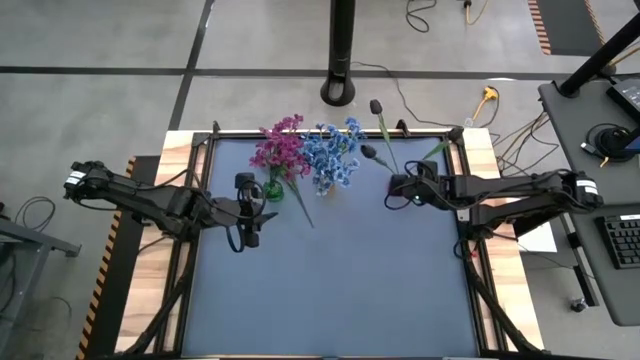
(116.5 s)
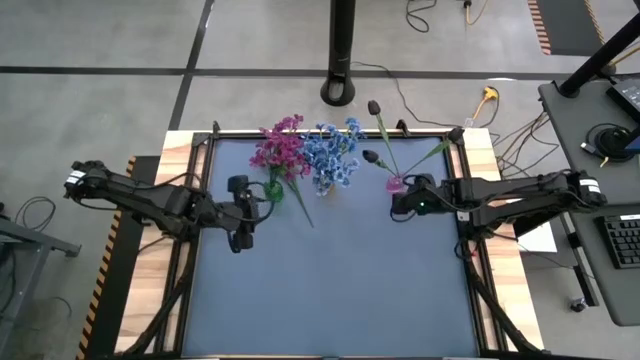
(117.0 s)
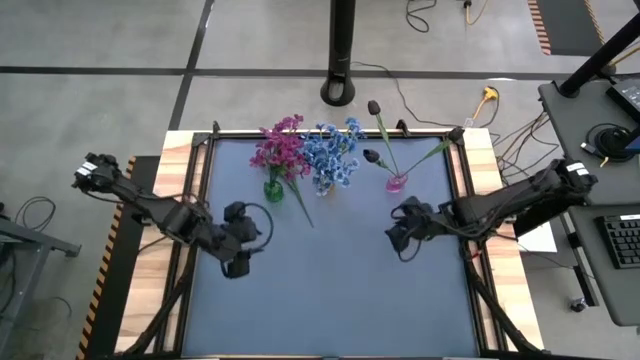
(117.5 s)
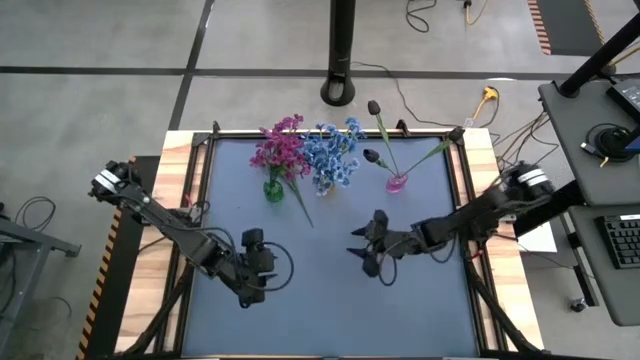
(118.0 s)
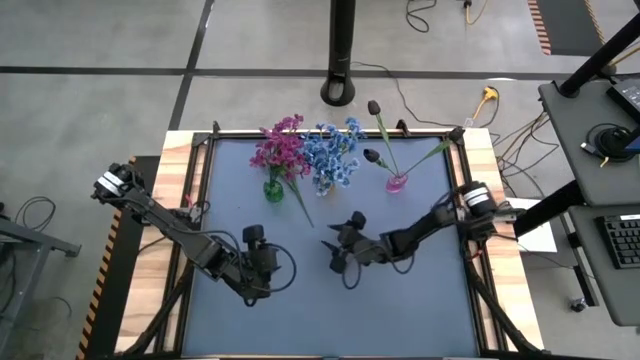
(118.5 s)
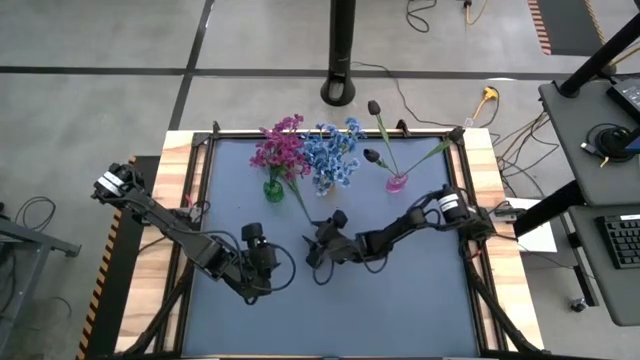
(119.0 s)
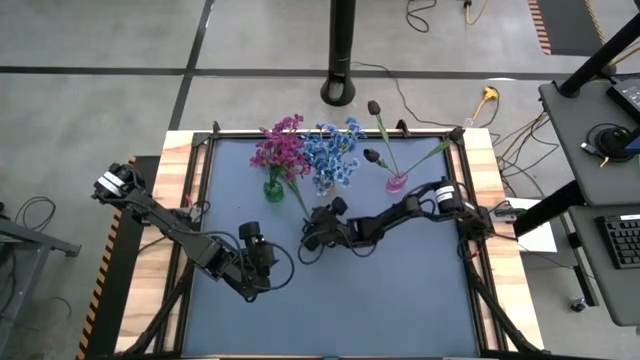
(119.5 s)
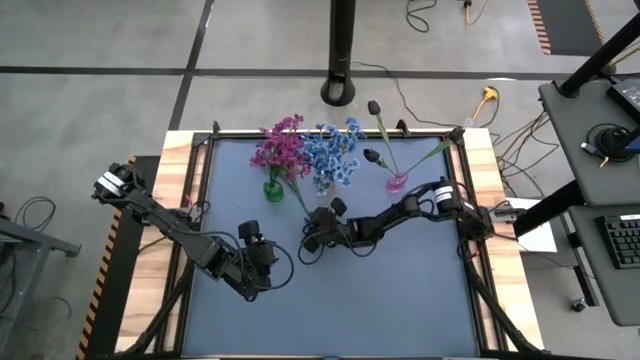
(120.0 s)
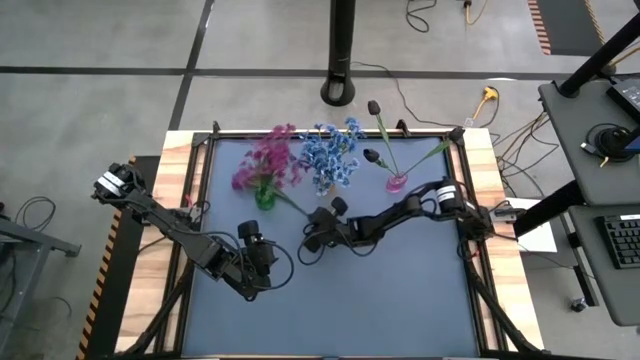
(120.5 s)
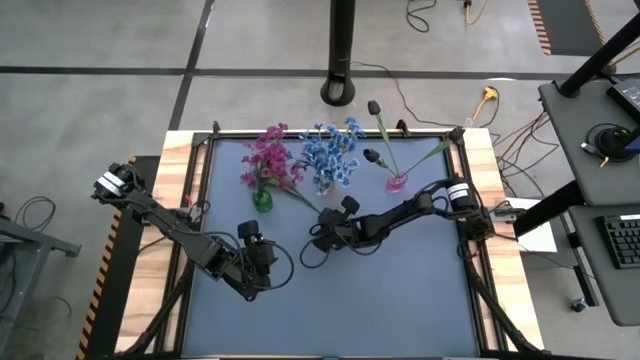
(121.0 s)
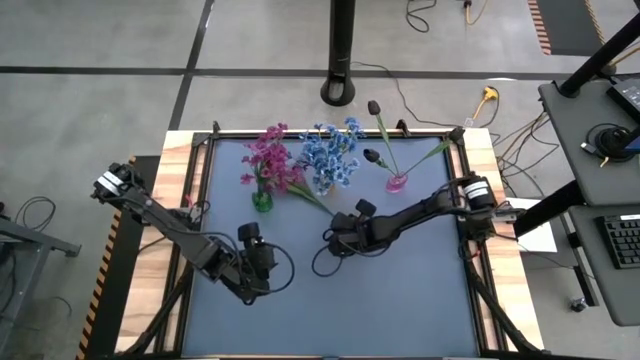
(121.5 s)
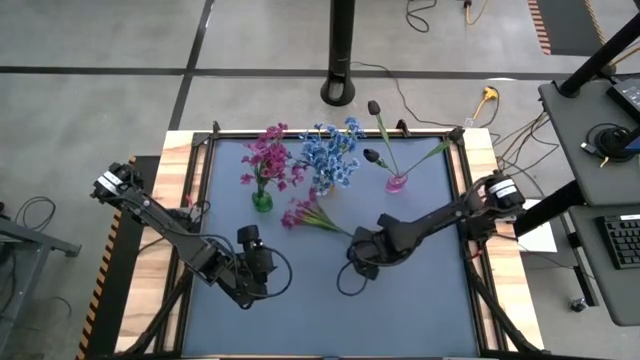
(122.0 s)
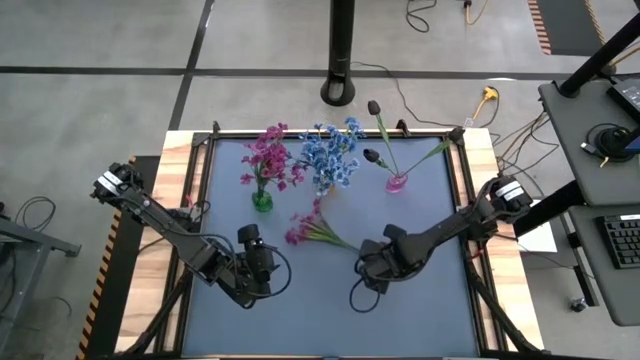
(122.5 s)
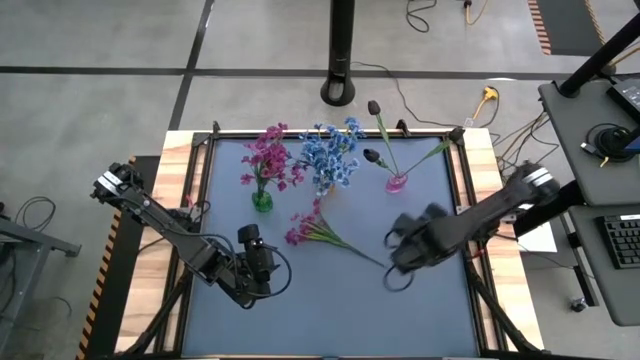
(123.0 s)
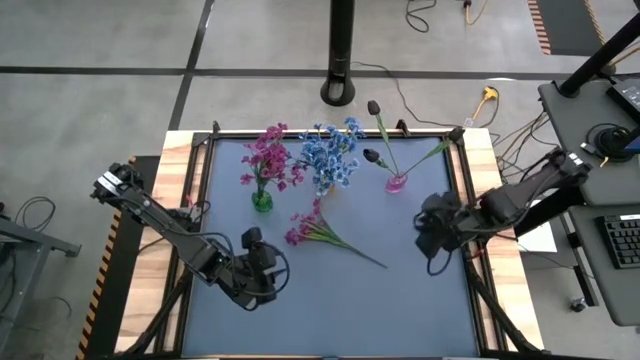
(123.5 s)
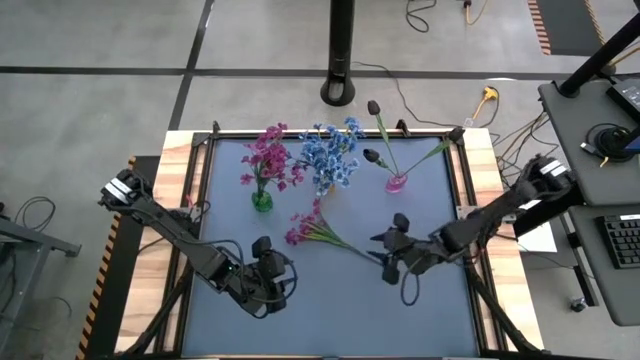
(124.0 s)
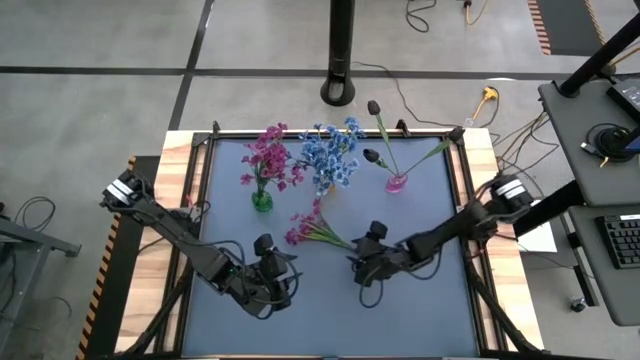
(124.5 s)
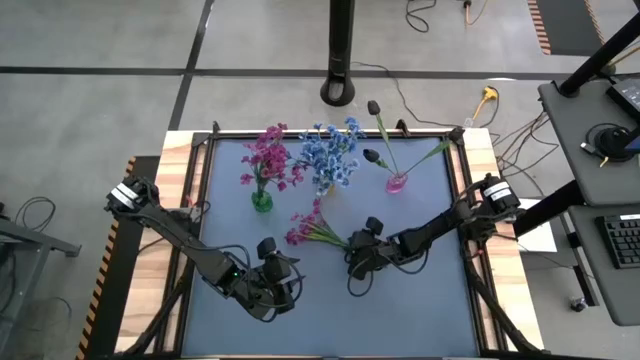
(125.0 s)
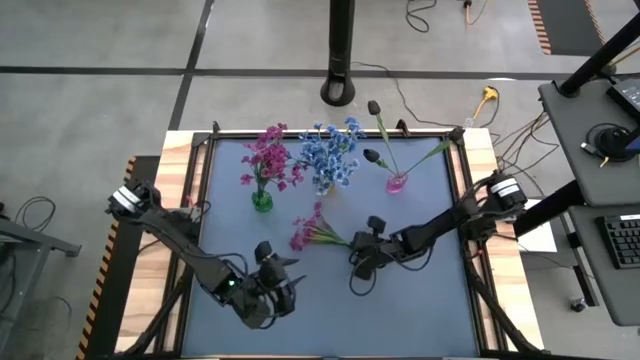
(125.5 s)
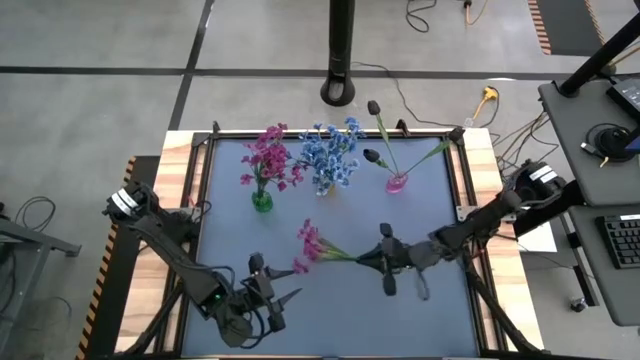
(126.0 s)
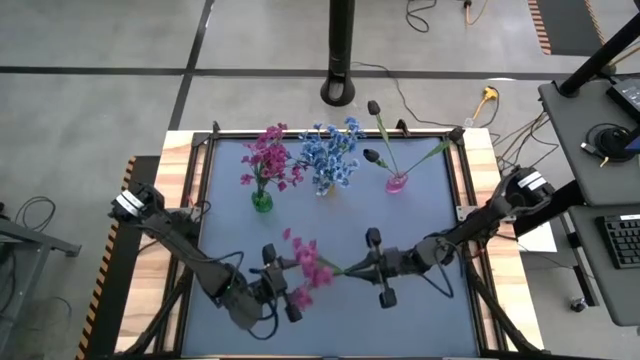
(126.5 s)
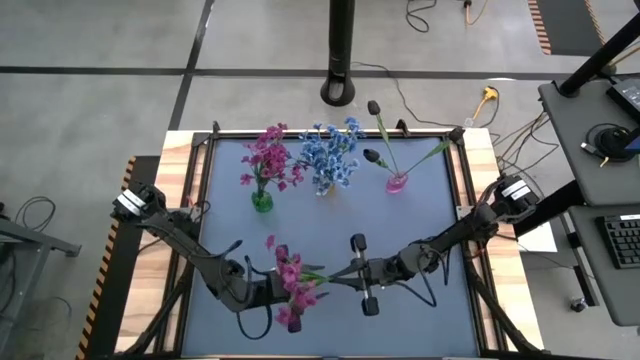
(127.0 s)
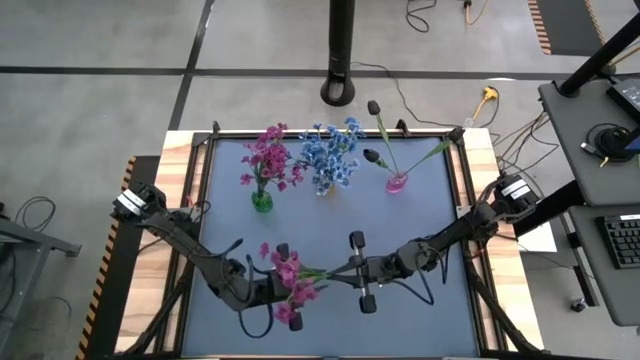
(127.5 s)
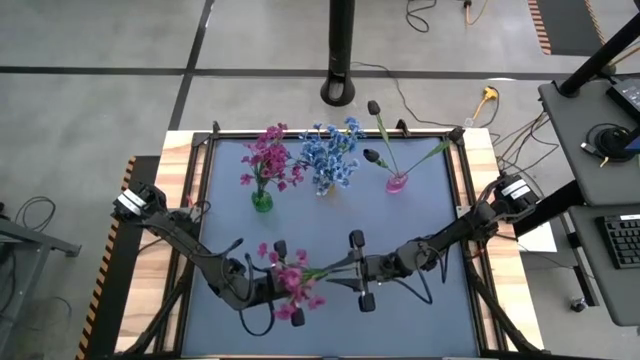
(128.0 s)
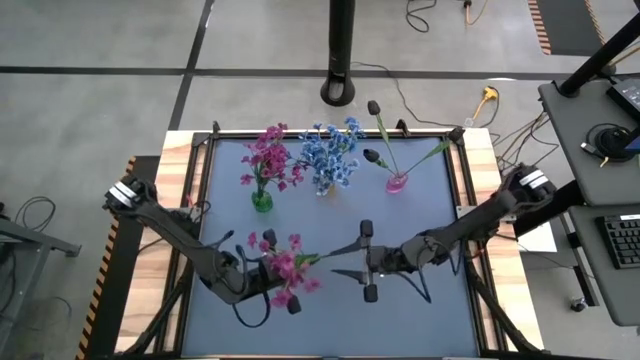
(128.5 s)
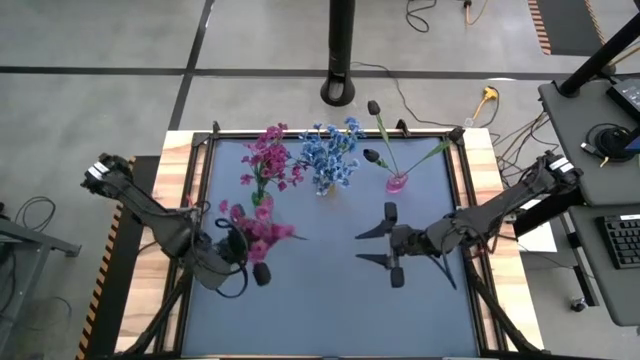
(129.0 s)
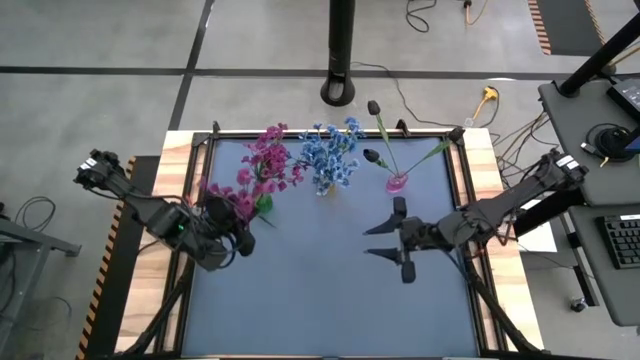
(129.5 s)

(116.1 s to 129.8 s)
Task: Sort flowers into vase by color
Put the purple flowers into the green flower vase

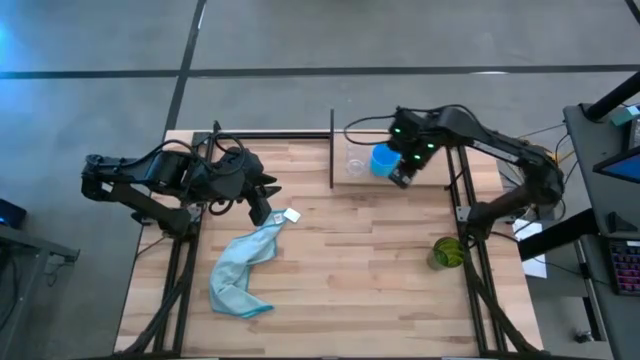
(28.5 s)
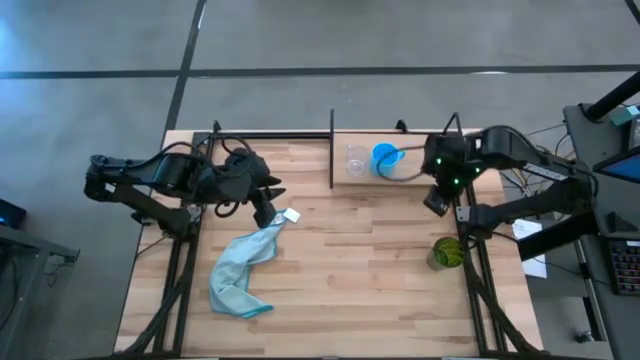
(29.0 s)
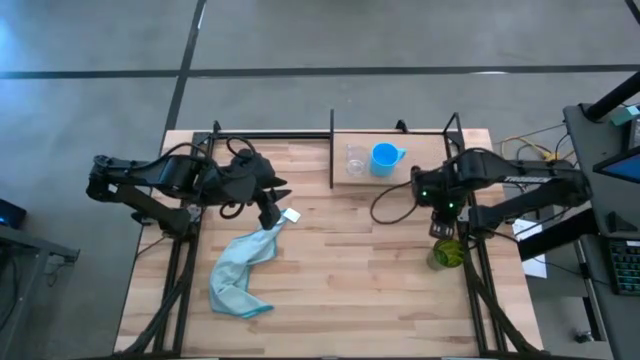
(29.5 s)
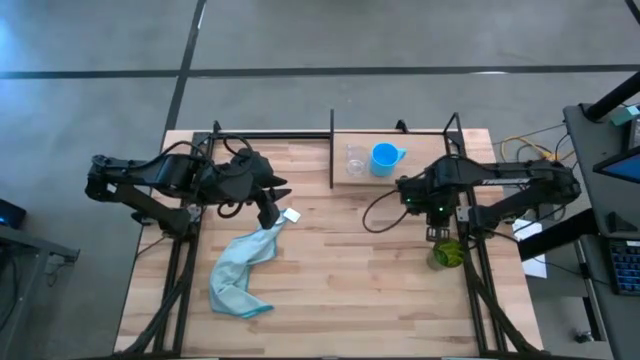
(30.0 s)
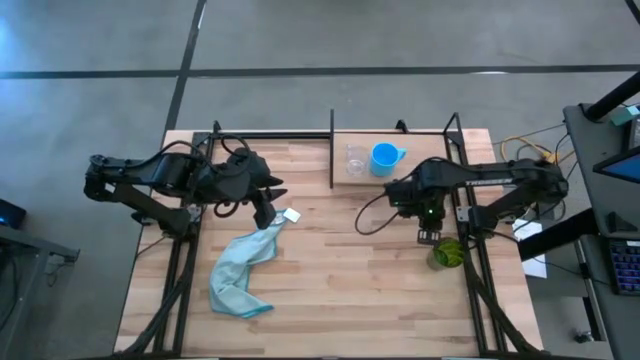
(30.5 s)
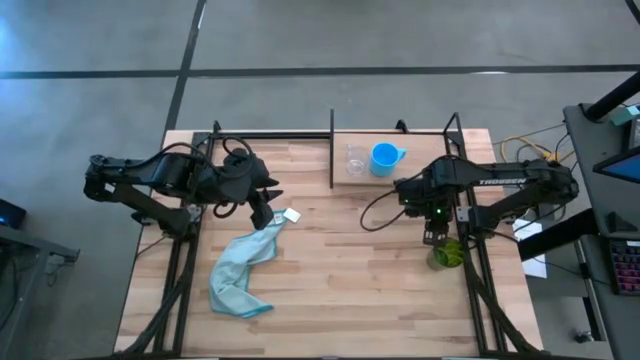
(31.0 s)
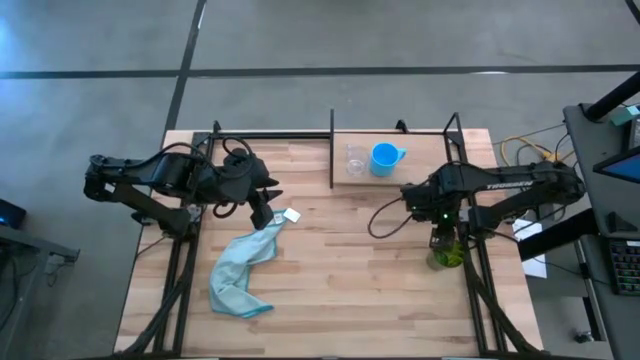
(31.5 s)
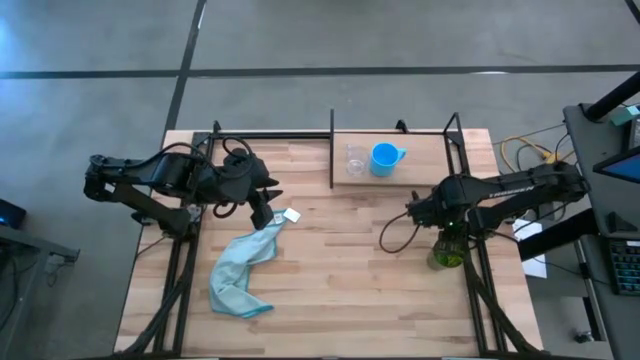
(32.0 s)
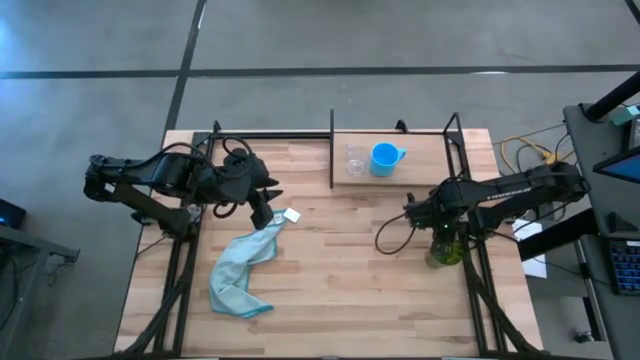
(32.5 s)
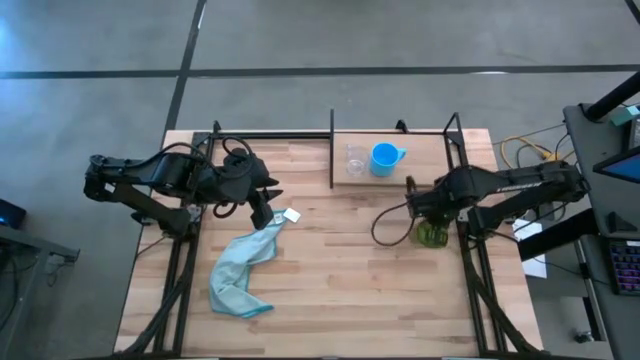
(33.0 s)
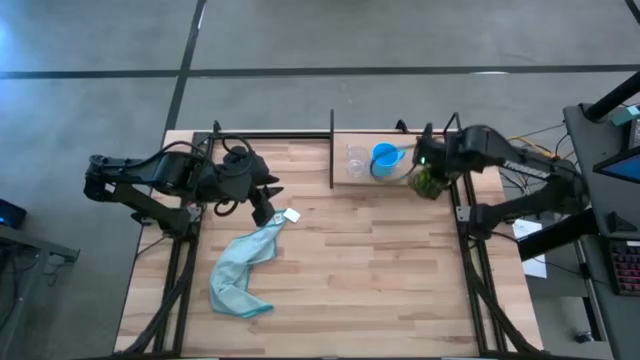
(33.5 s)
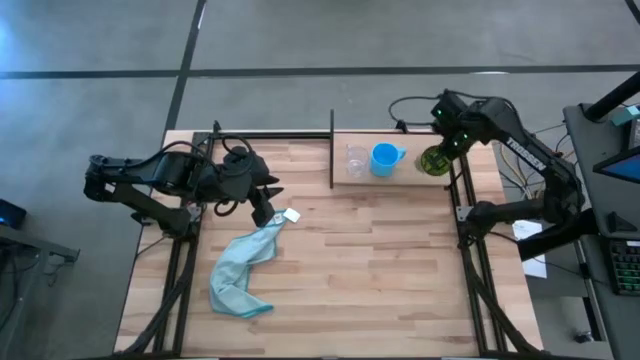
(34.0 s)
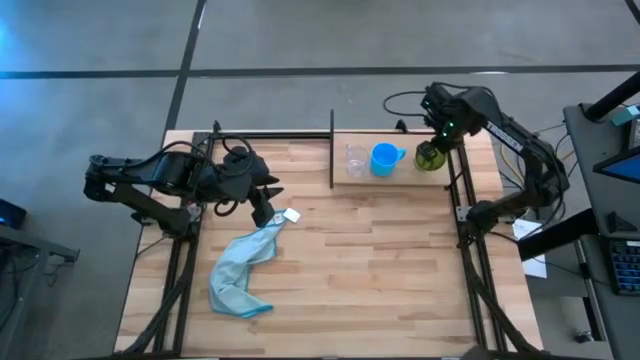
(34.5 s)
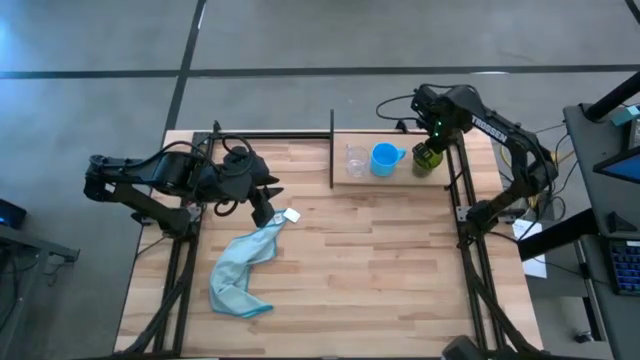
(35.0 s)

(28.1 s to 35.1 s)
Task: Stack small to large cups/mugs on shelf
Put the green cup on the shelf
